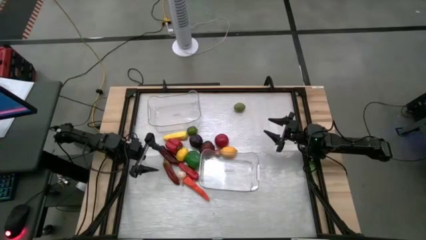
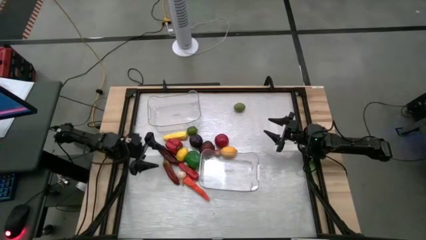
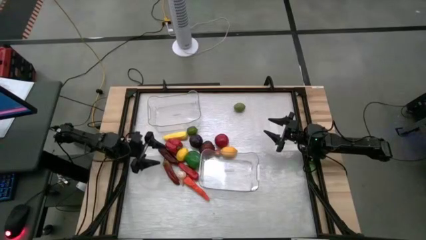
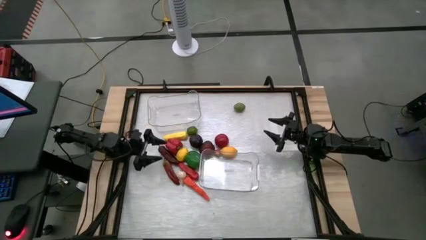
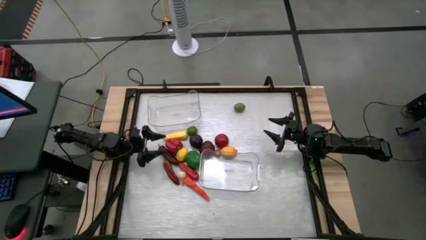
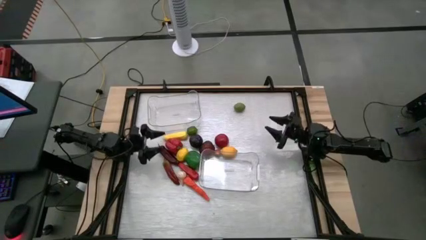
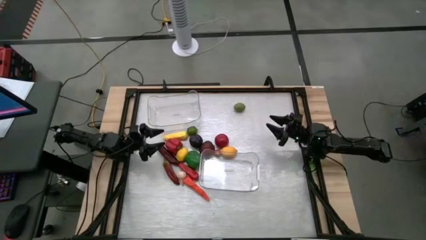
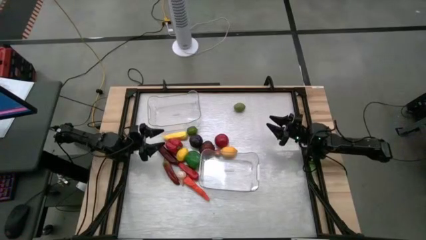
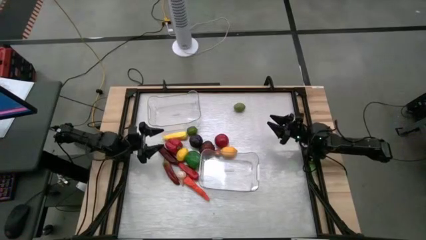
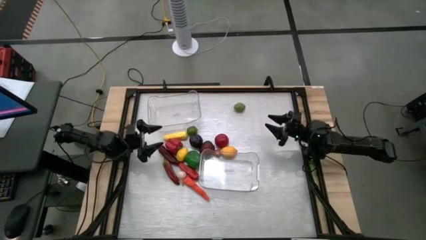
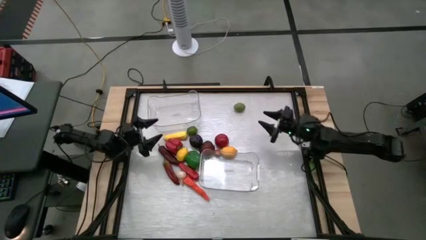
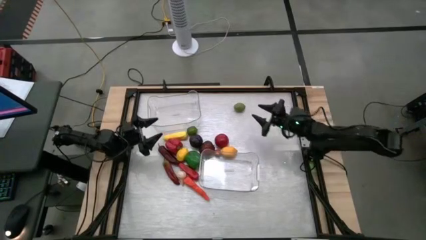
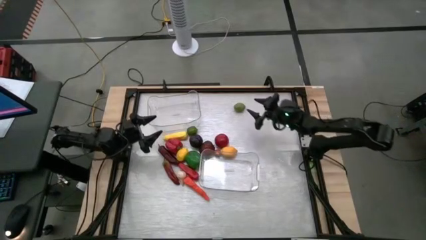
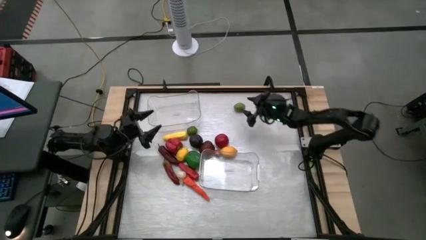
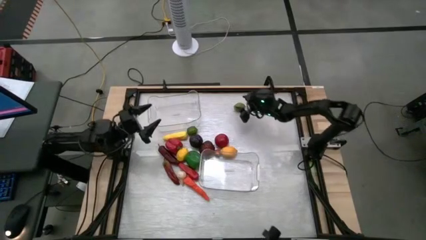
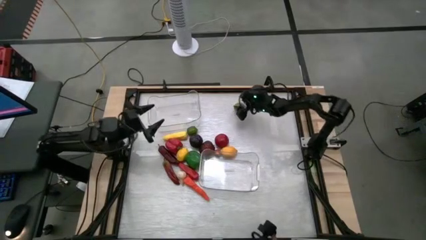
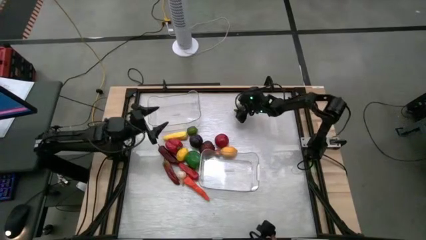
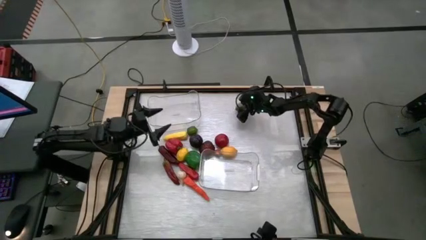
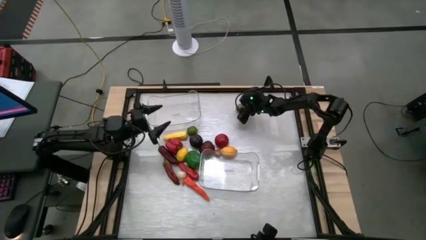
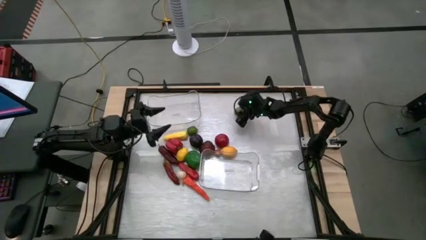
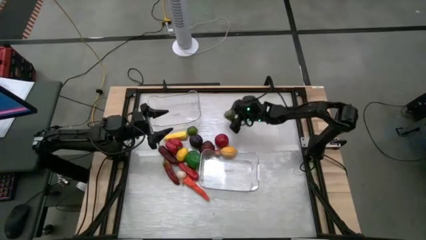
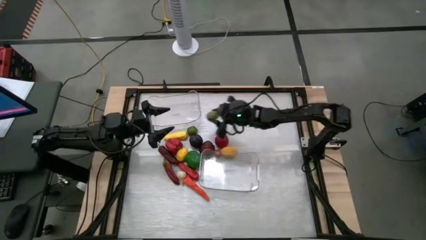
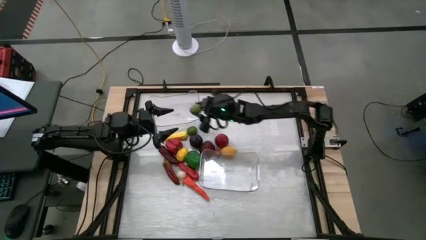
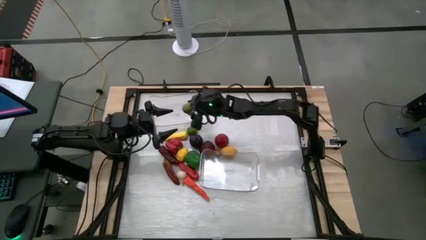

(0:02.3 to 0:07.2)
Task: Sort produce into baskets
Put the top right green lime into the top transparent bin

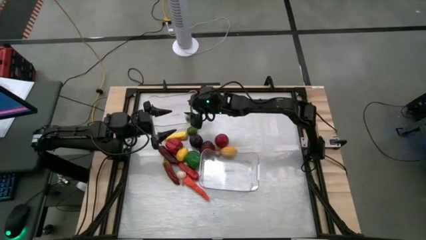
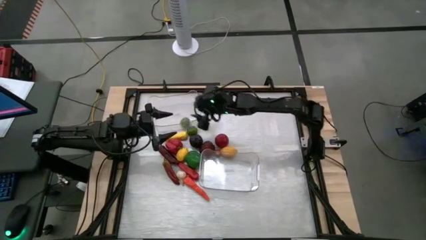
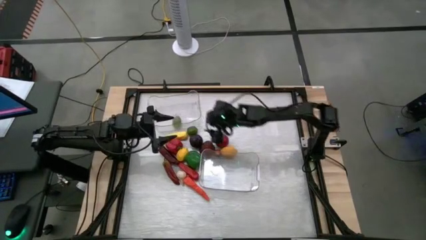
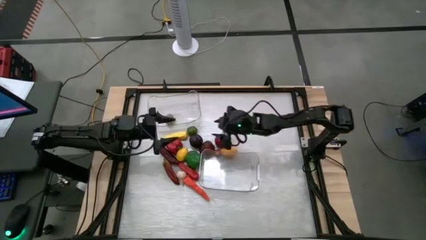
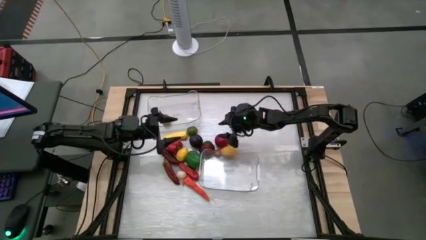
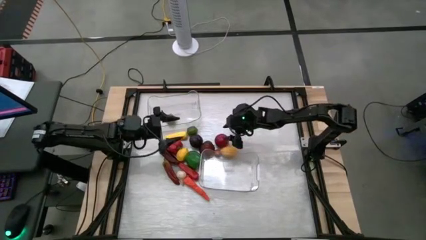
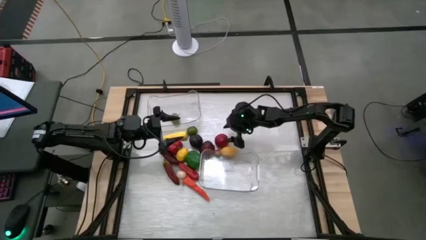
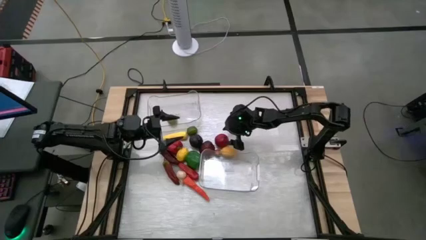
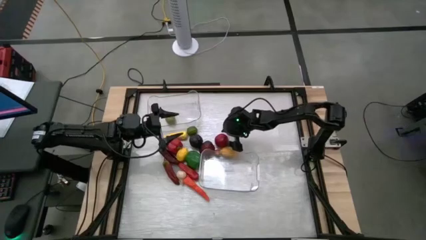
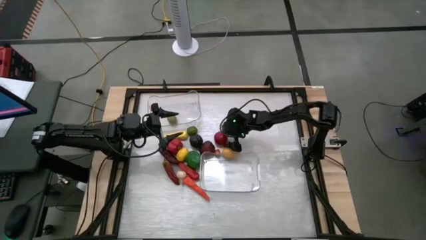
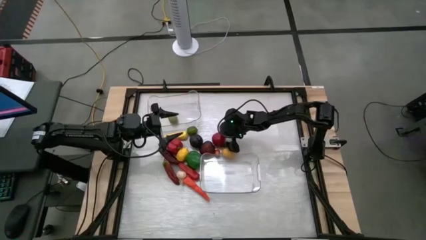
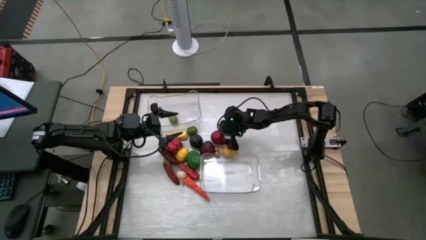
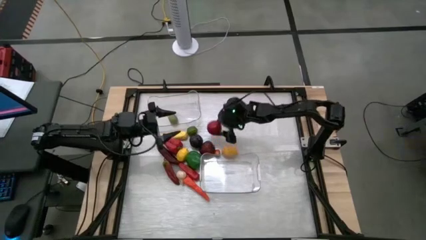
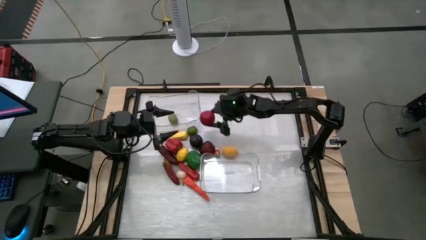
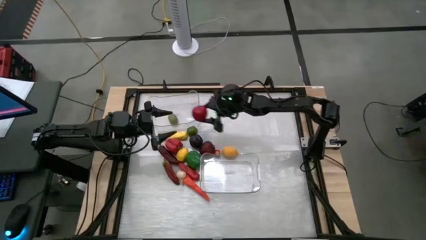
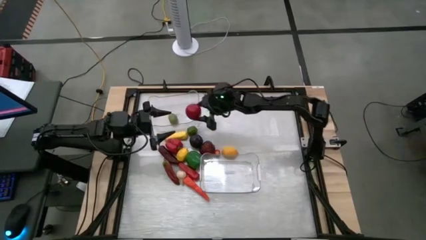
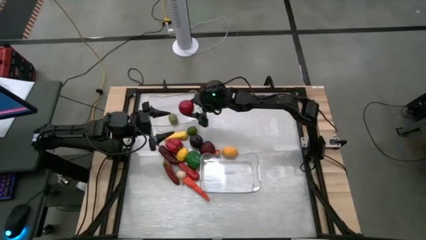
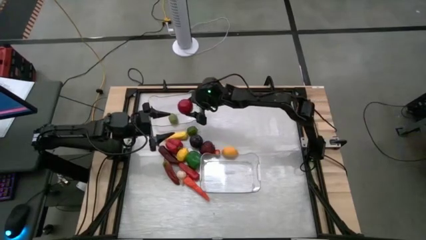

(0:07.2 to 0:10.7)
Put the red tomato into the top transparent bin

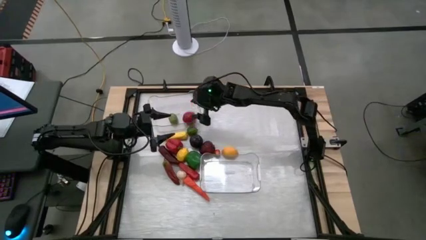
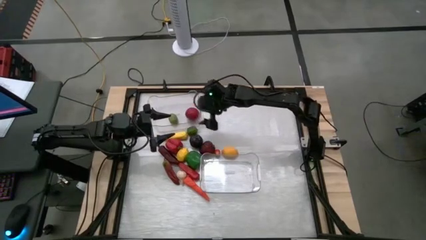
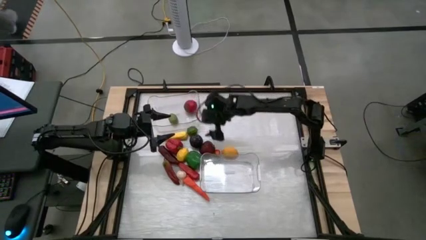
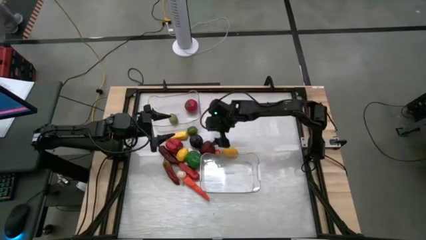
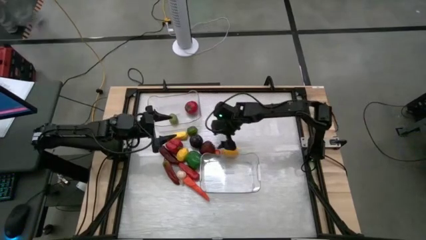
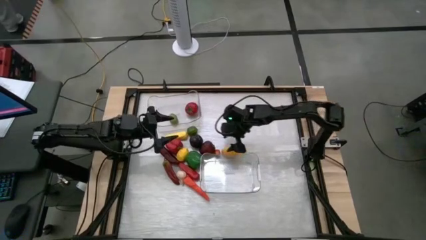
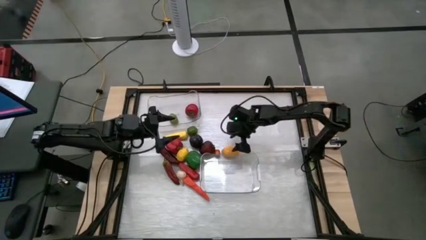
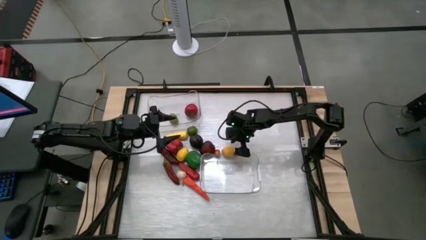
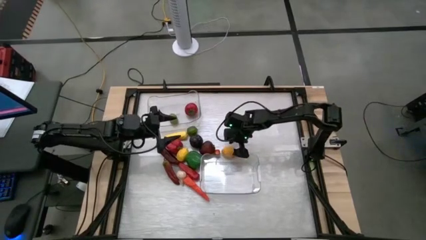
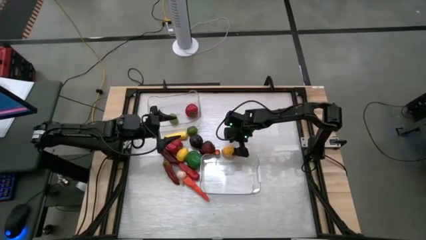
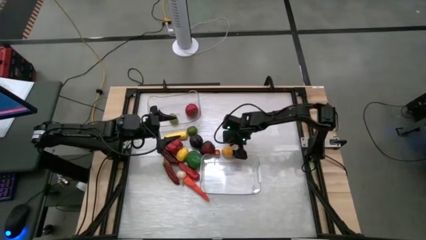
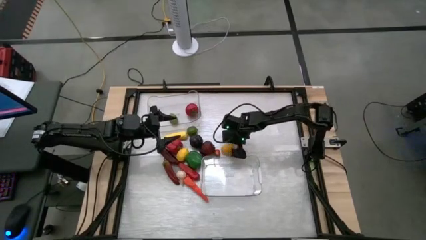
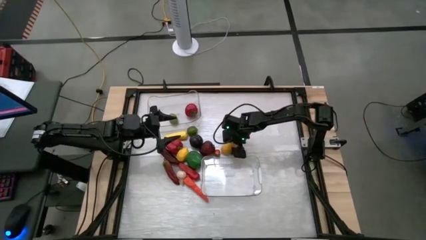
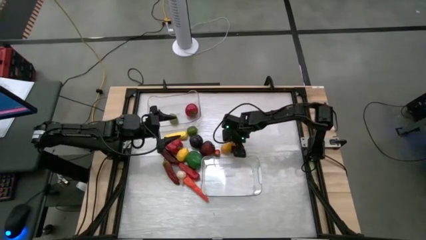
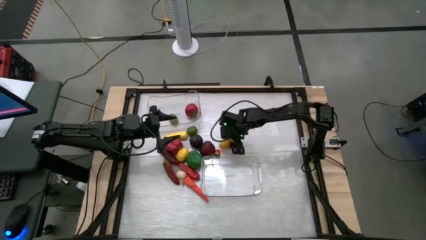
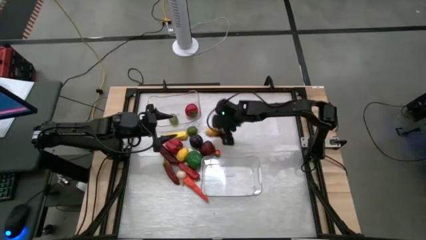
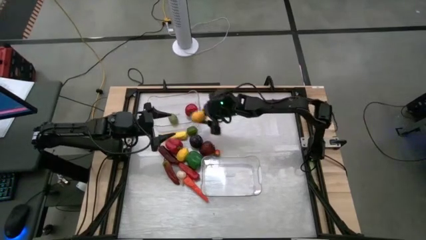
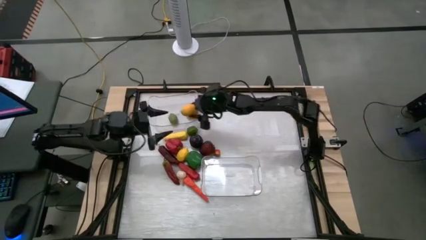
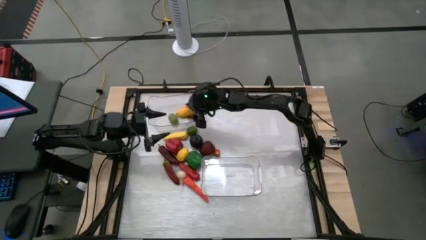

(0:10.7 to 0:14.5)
Put the right yellow lemon into the top transparent bin

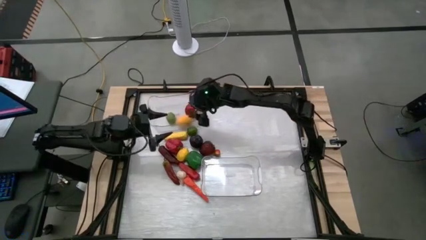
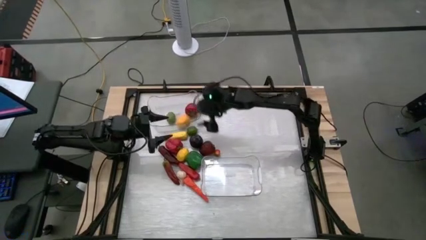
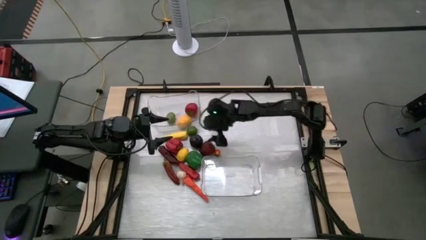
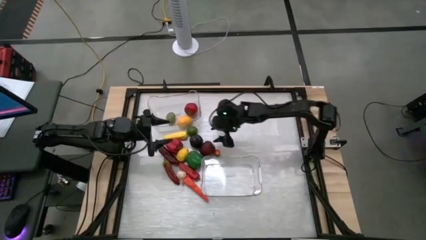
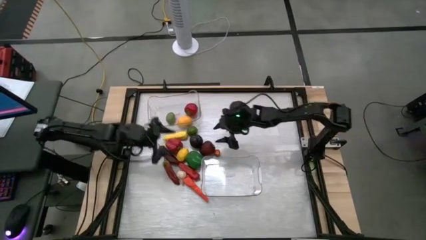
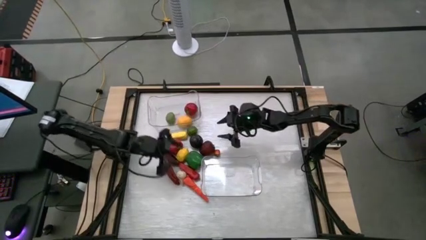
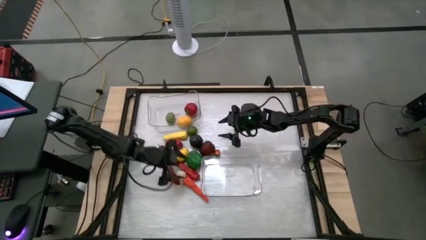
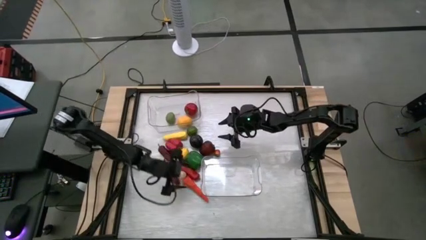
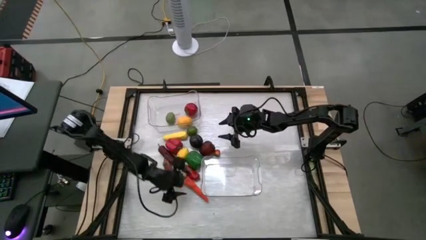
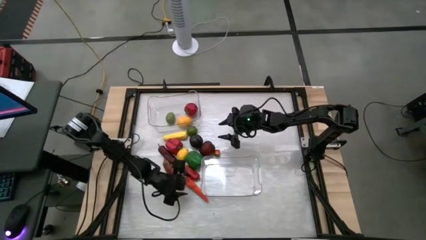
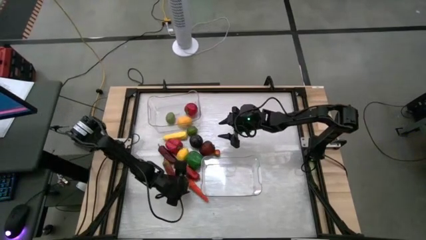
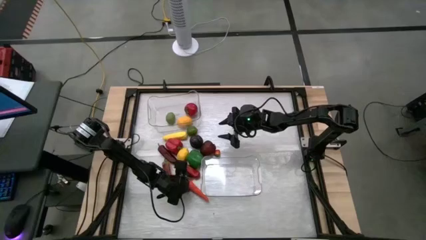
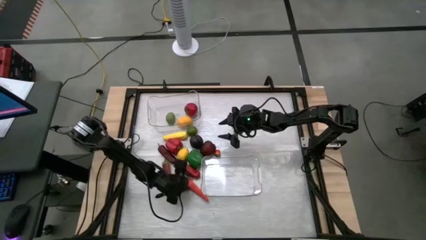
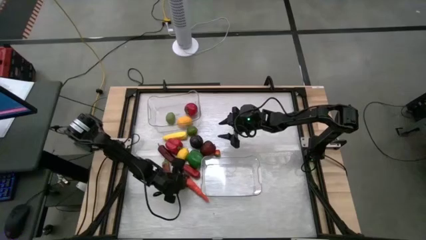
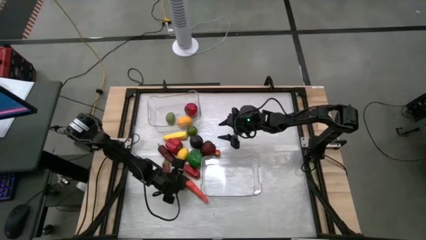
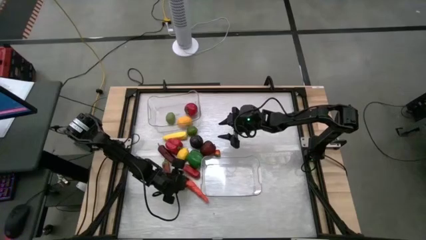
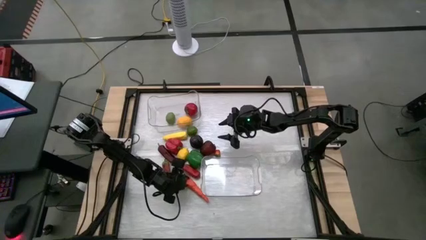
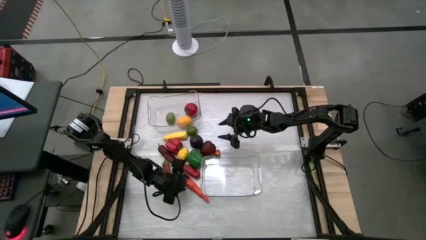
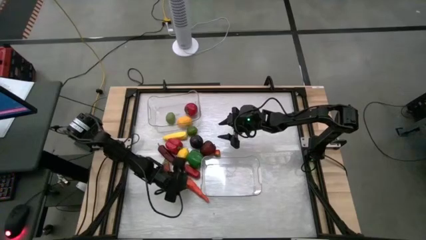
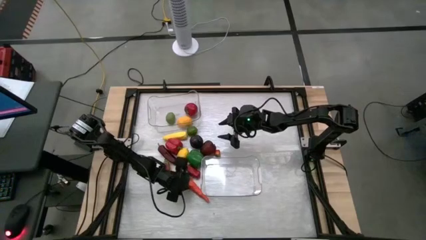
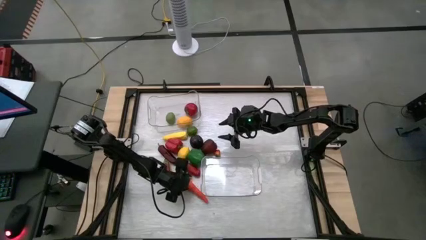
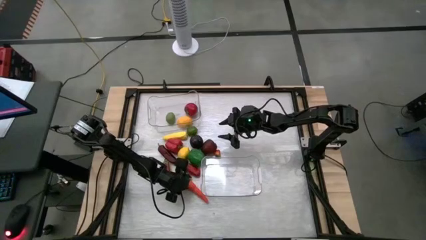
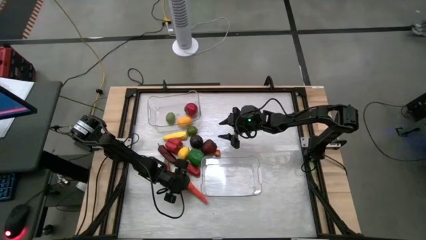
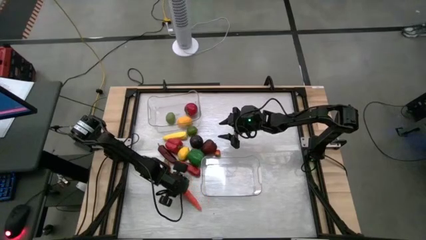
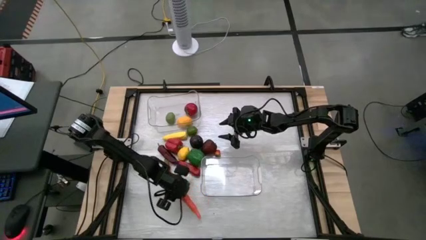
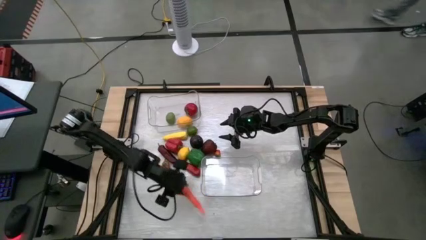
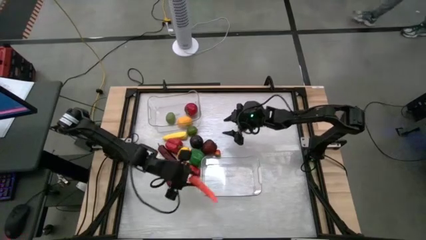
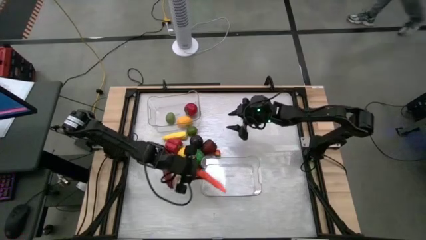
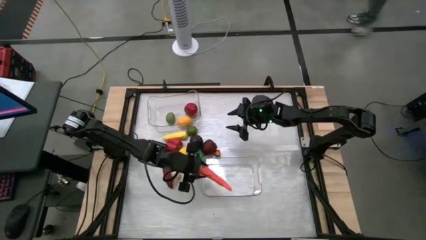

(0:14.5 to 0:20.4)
Put the orange carrot into the bottom transparent bin
